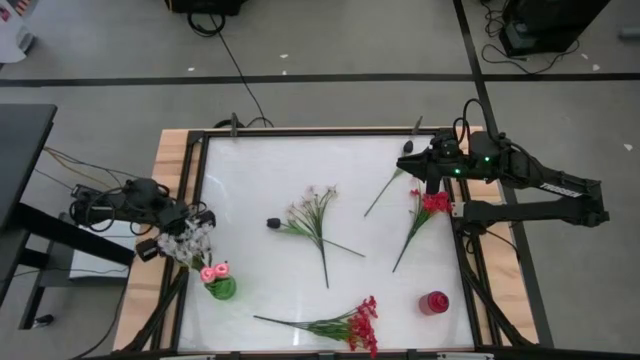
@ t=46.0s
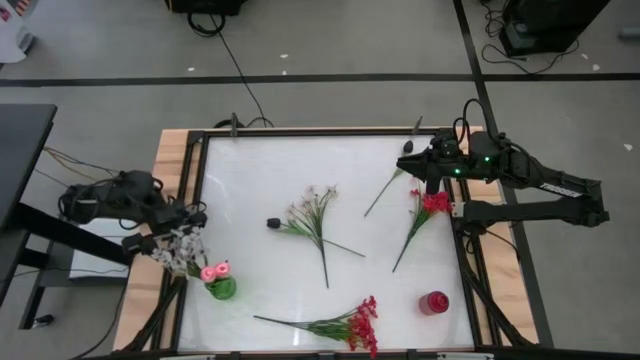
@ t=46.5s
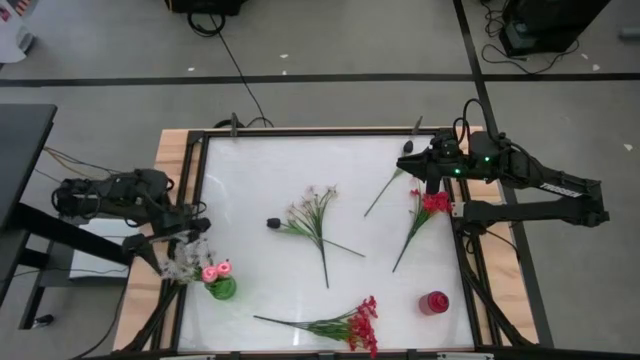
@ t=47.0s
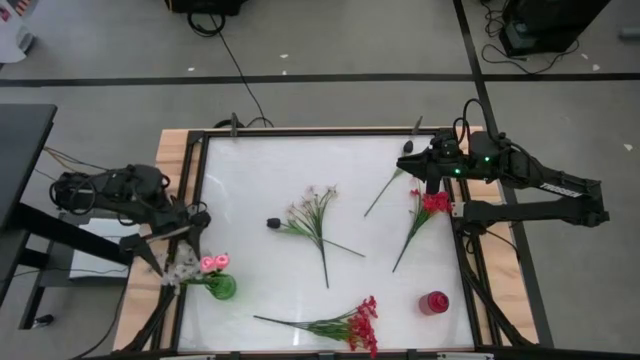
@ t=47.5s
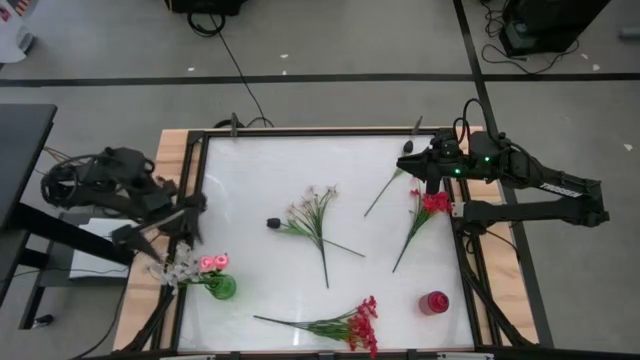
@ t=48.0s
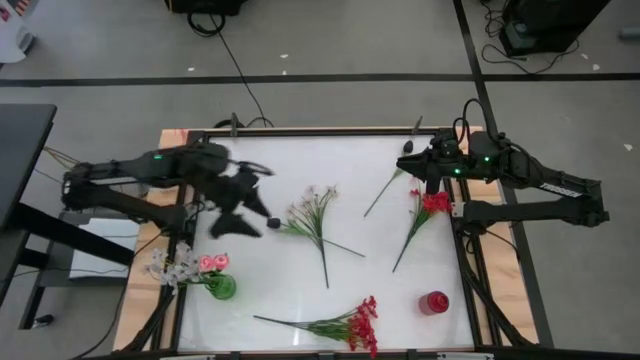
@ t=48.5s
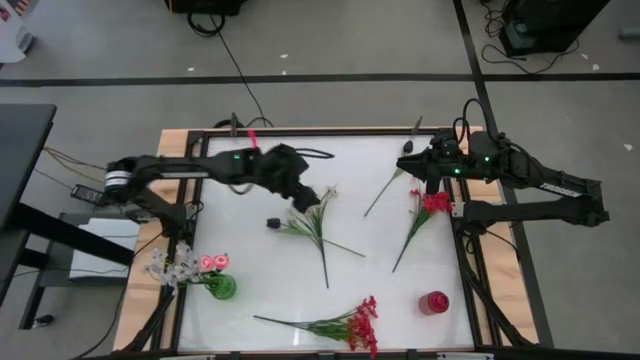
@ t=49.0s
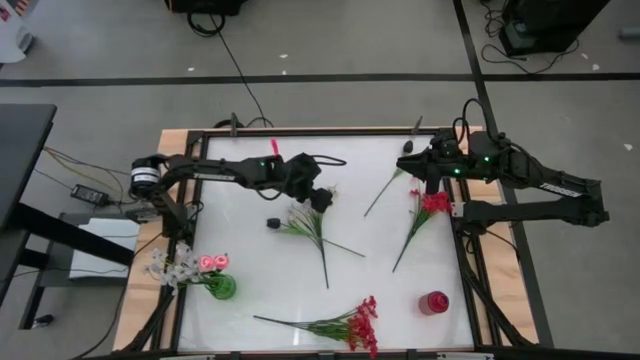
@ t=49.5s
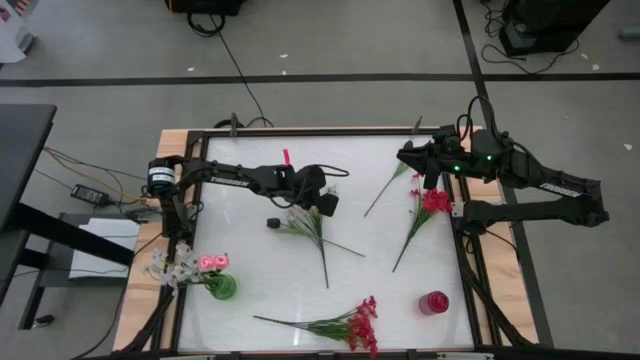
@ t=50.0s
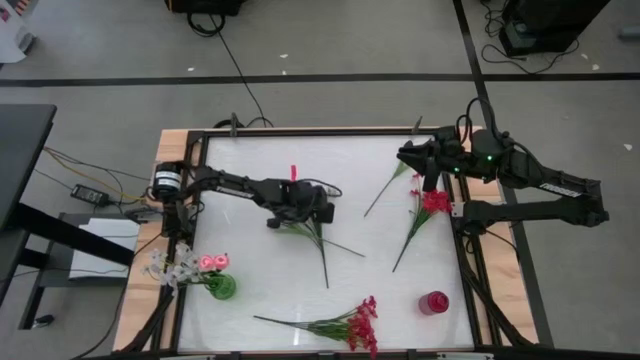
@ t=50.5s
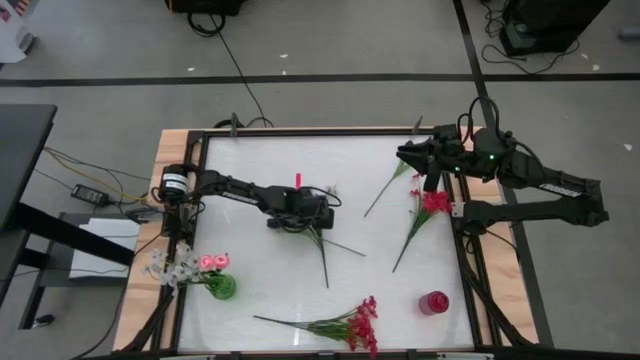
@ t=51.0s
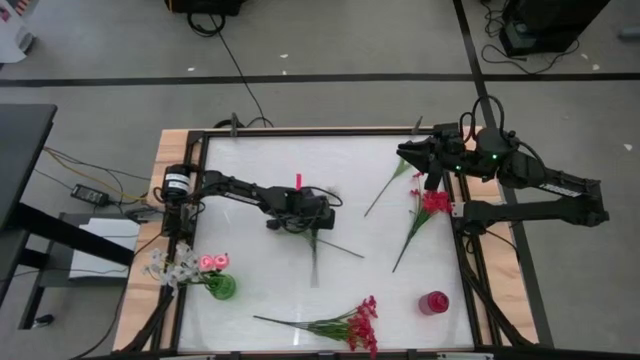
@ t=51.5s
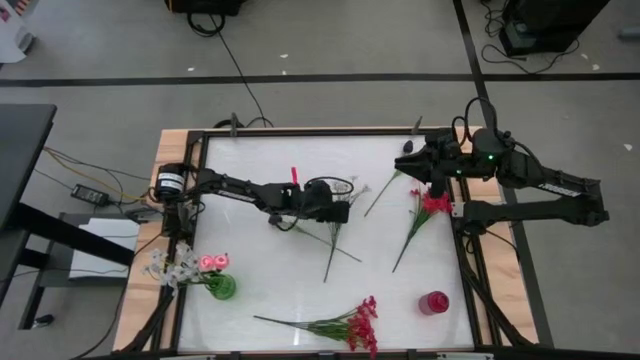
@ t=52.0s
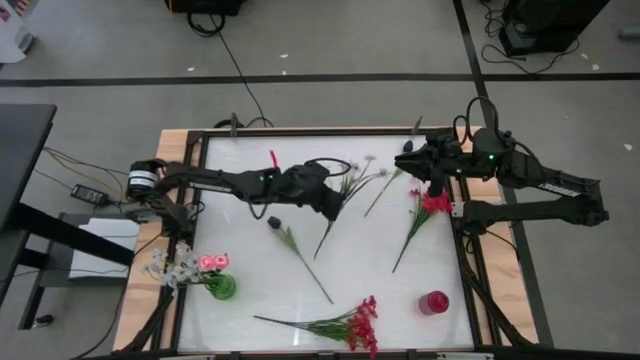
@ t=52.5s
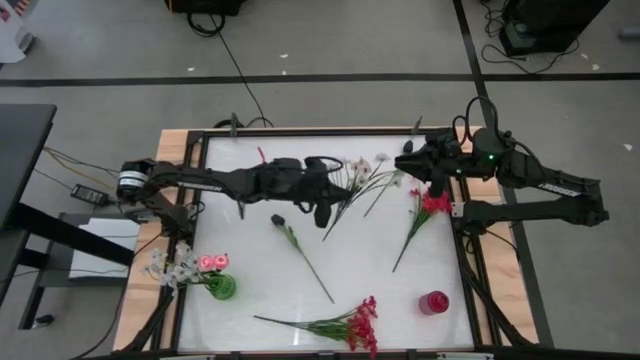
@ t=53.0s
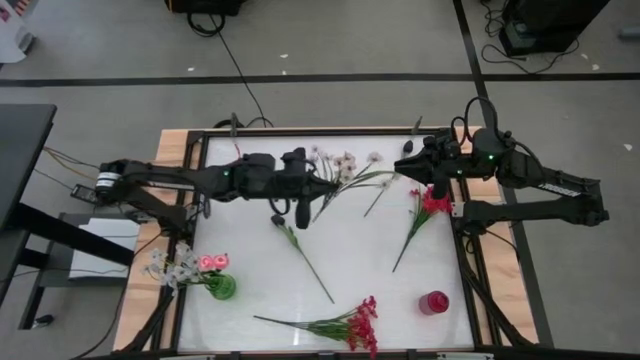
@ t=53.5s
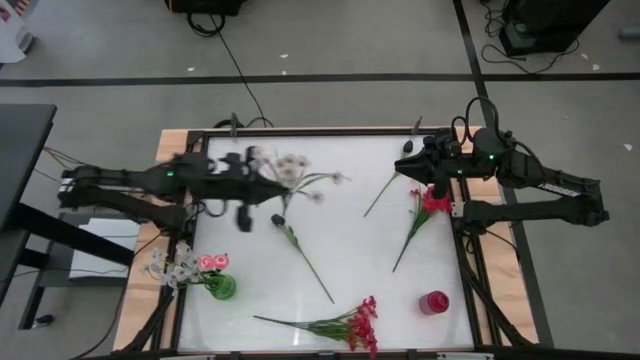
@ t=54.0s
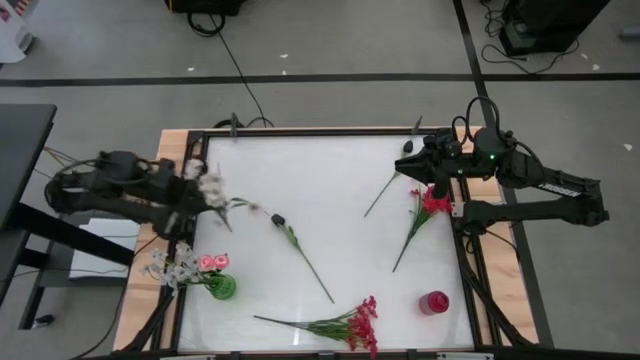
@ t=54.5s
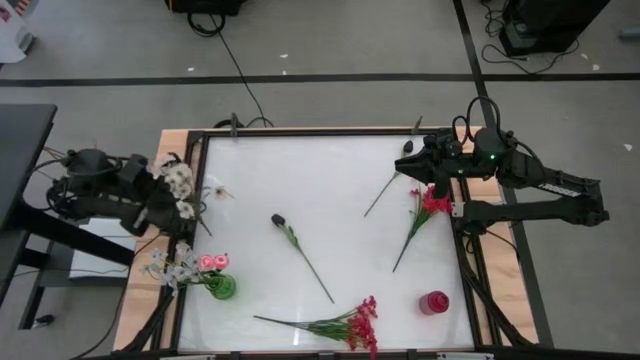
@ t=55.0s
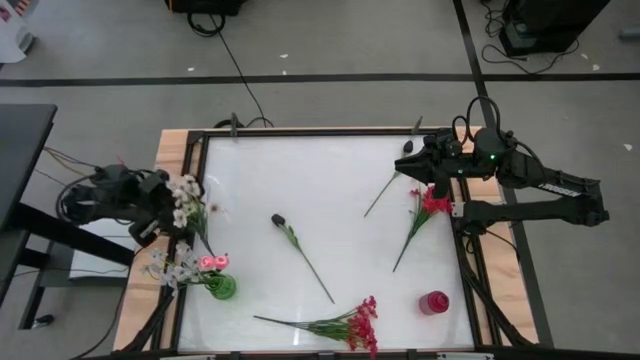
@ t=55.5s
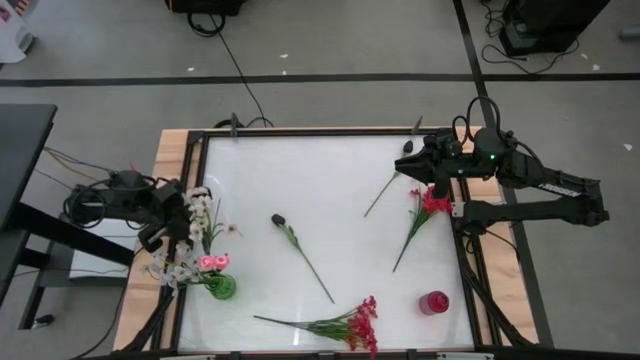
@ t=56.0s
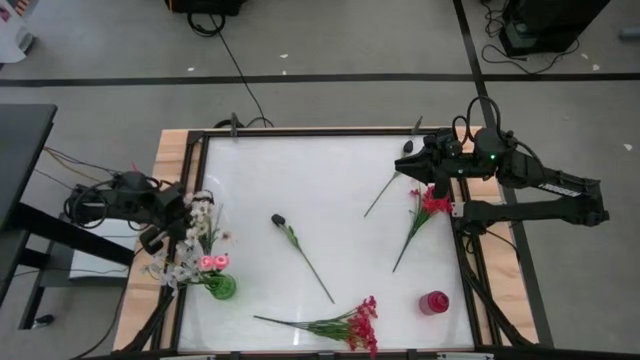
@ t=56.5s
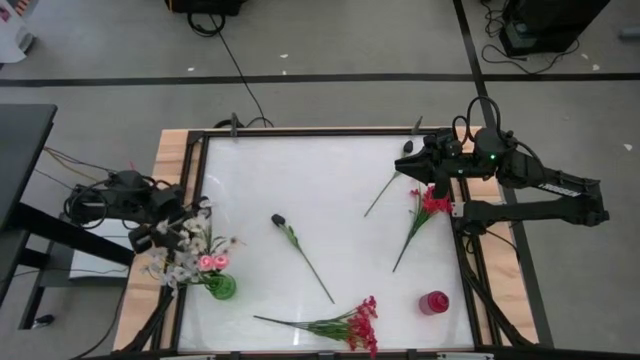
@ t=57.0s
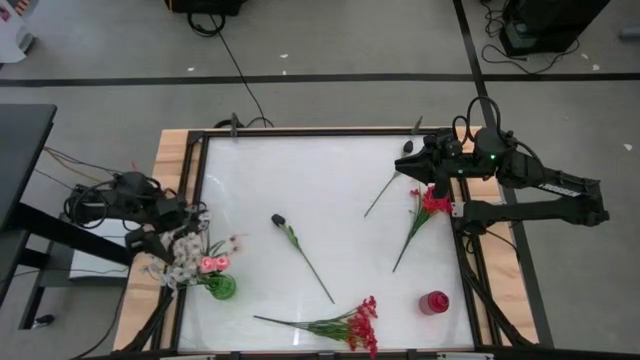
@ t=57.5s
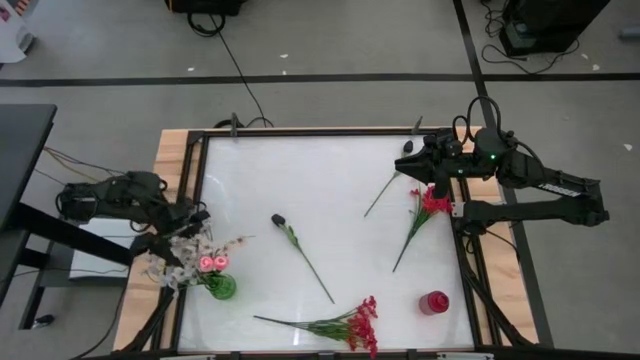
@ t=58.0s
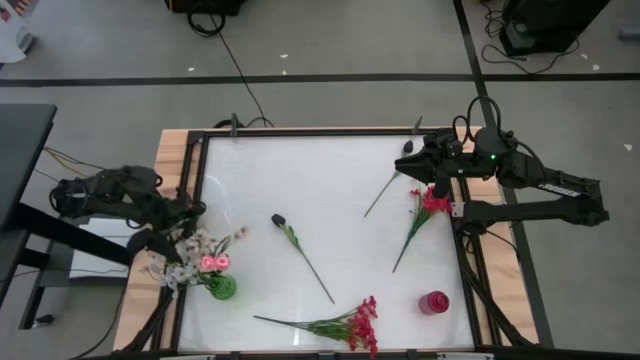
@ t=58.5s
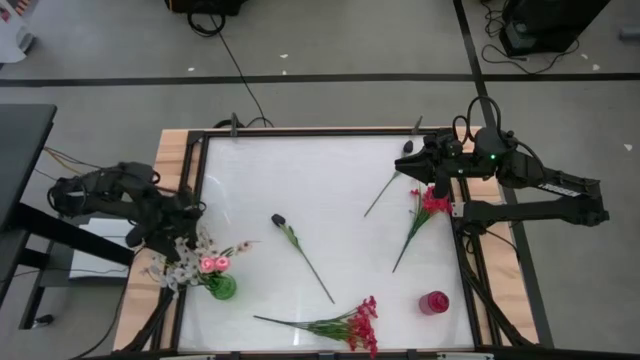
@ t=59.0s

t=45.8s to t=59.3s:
Task: Sort flowers into vase by color
Put the white flowers into the green vase

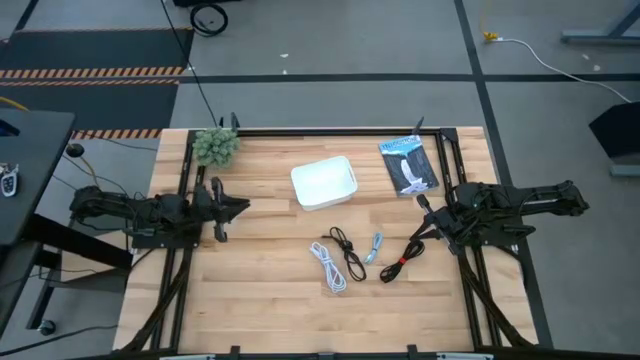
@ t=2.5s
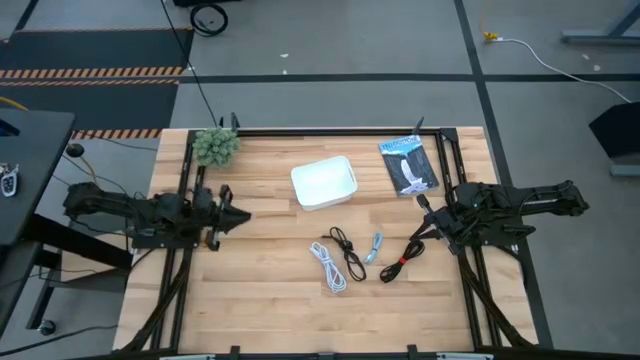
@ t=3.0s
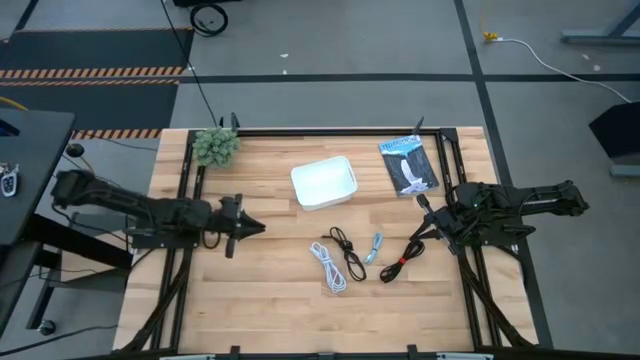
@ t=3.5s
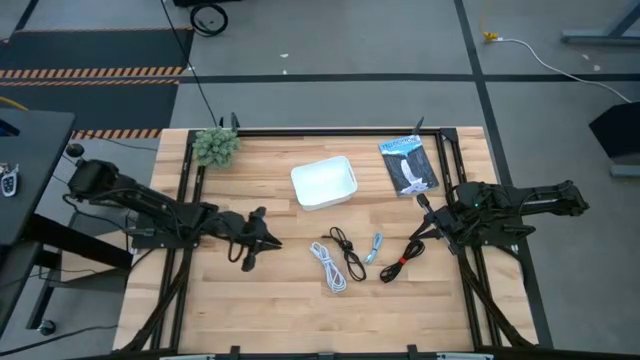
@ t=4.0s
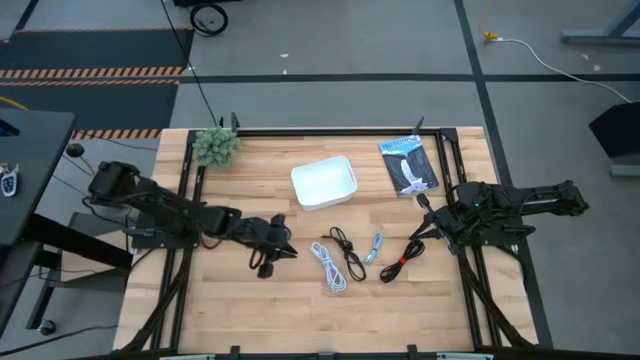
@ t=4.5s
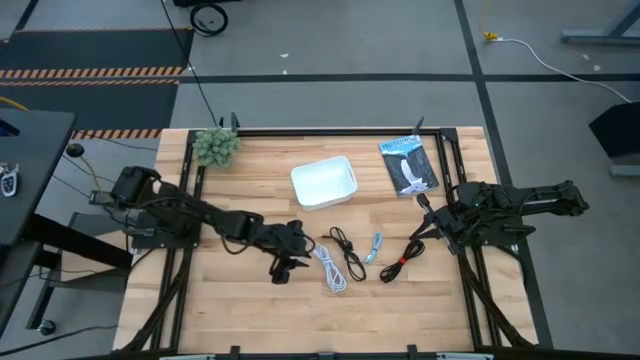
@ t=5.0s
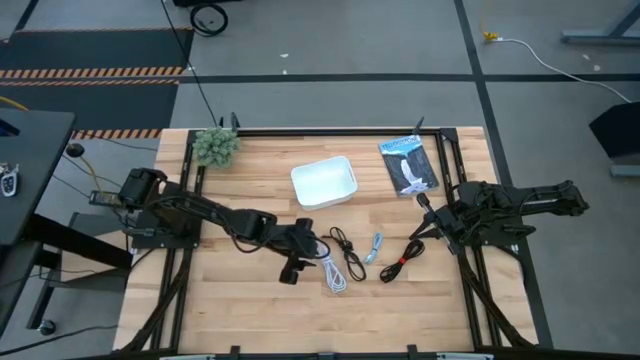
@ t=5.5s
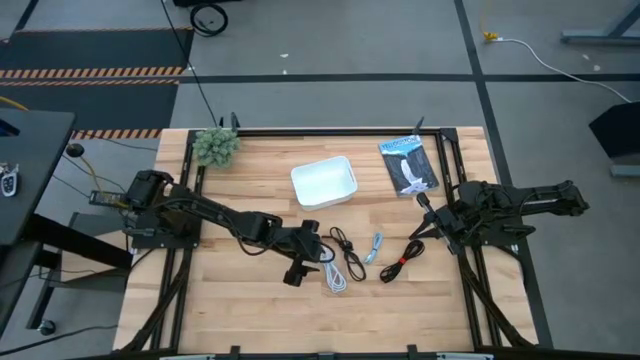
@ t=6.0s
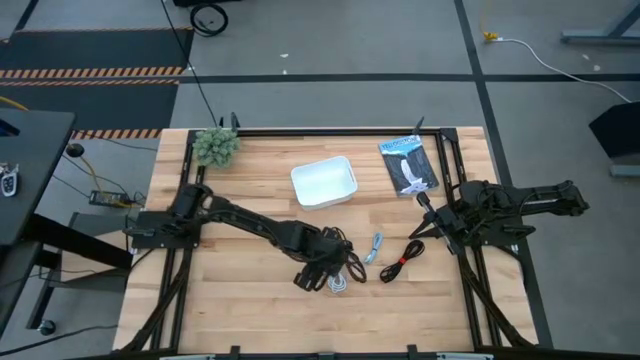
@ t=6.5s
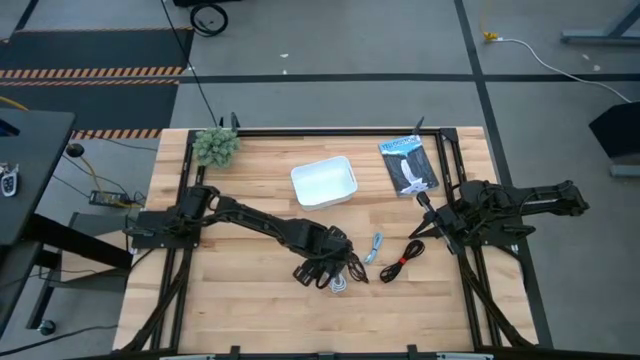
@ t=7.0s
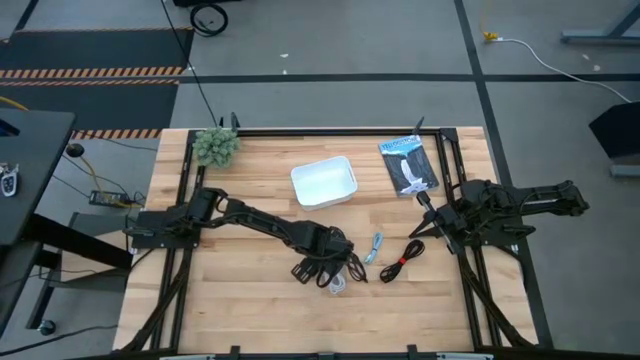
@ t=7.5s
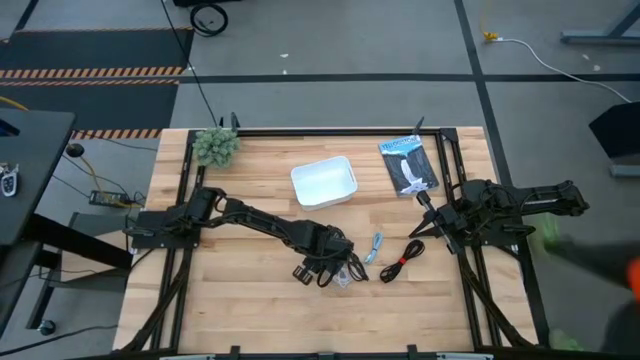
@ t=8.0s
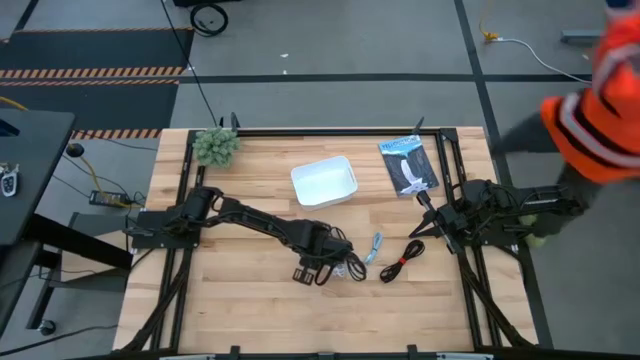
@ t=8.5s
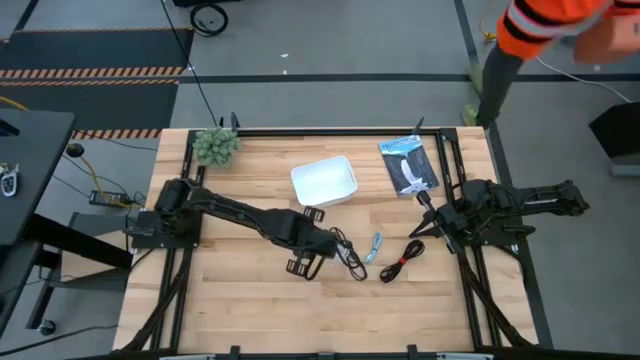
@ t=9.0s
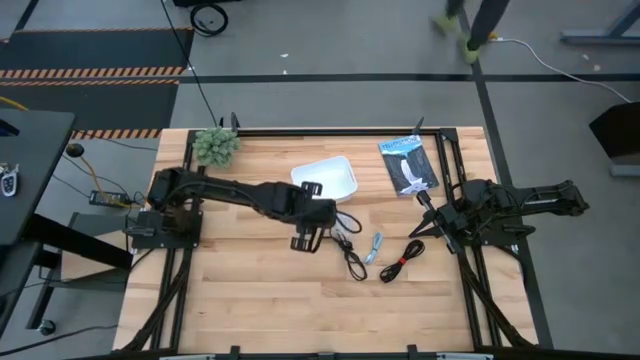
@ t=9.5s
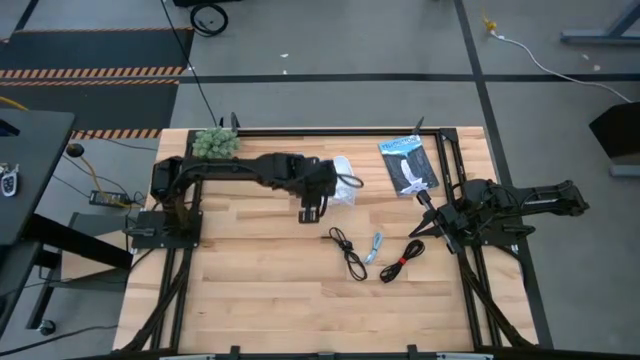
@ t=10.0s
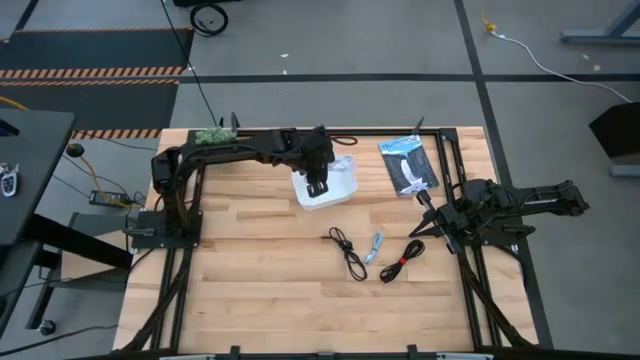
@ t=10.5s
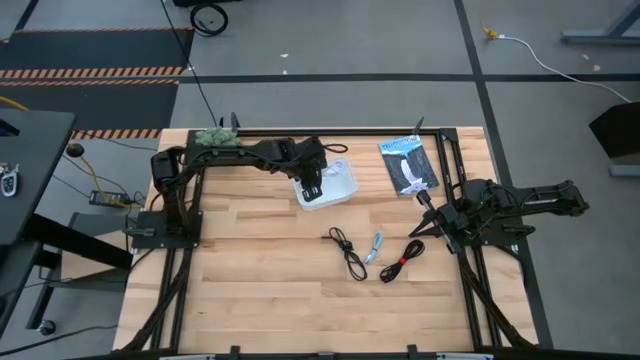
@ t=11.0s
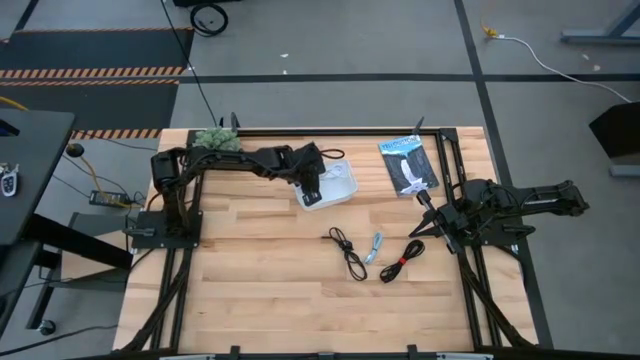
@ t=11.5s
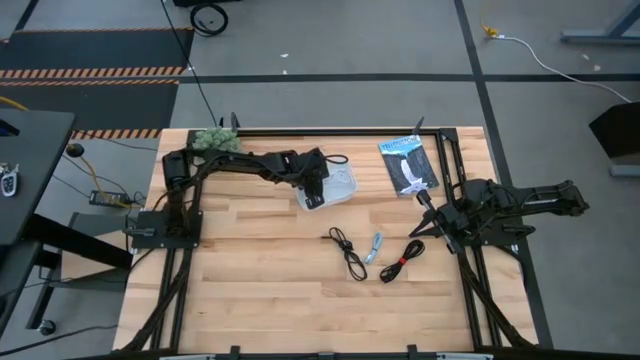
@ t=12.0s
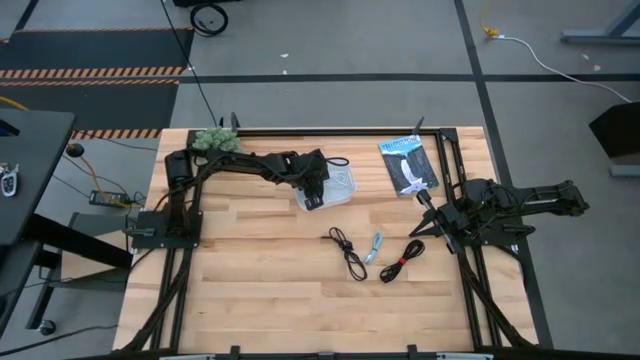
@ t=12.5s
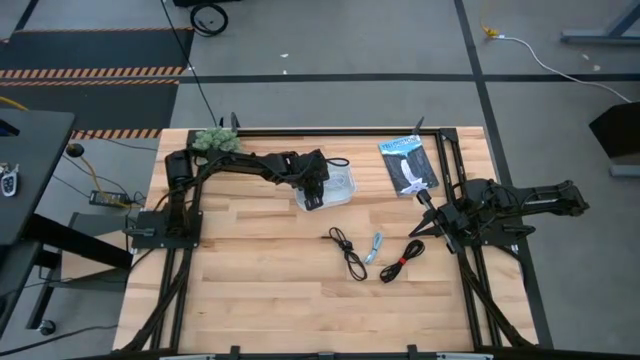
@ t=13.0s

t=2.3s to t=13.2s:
Task: Pick and place USB-C Cables
Put the white charger cable into the white bin
